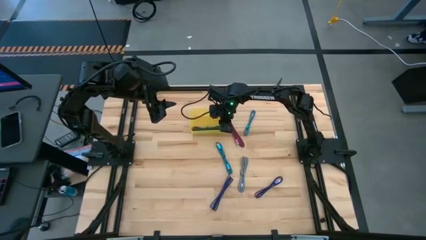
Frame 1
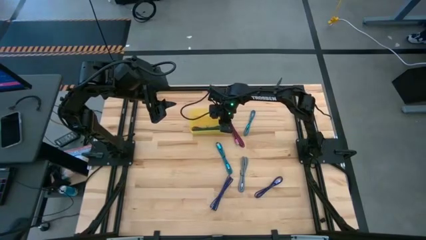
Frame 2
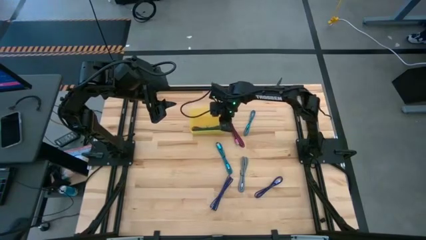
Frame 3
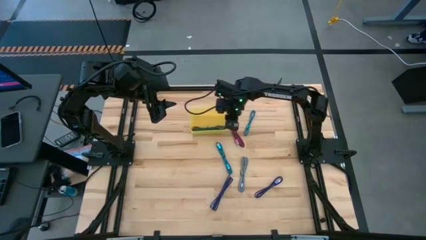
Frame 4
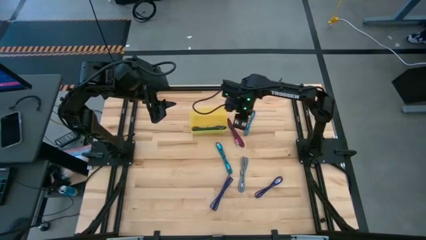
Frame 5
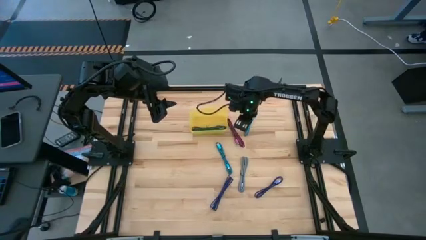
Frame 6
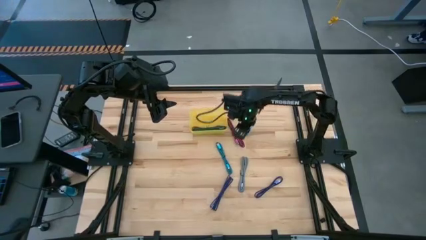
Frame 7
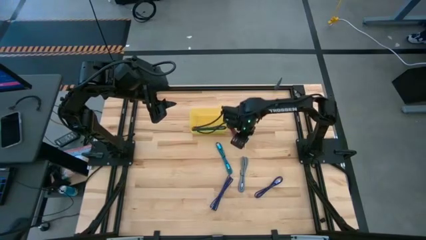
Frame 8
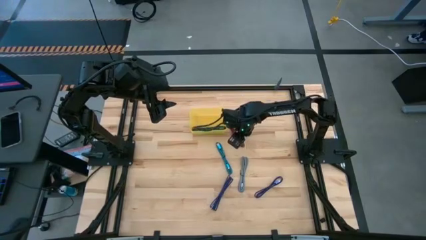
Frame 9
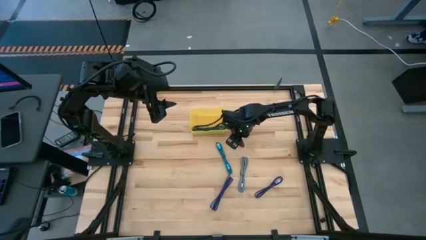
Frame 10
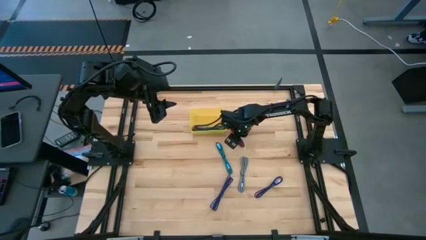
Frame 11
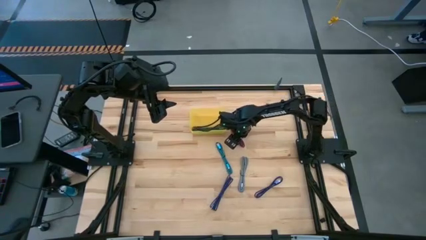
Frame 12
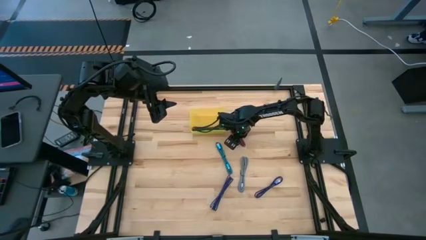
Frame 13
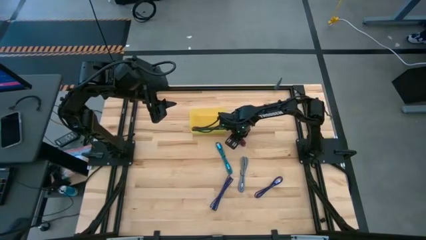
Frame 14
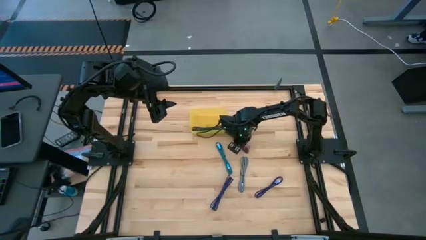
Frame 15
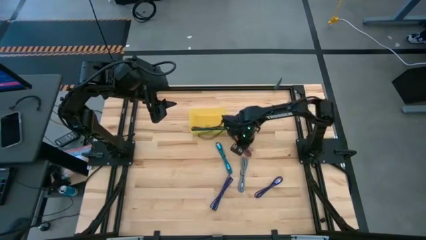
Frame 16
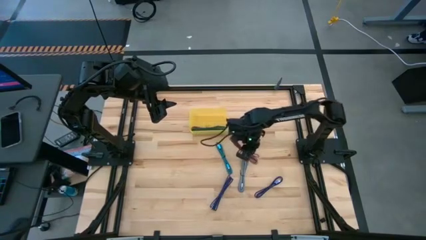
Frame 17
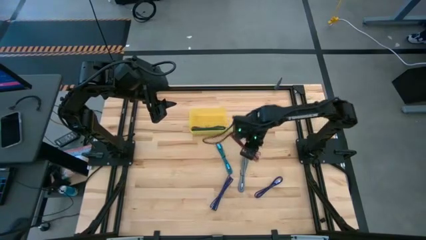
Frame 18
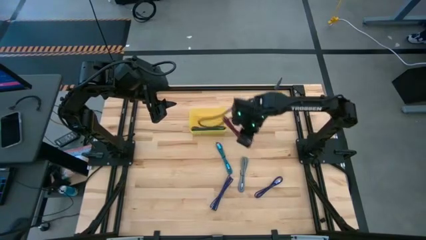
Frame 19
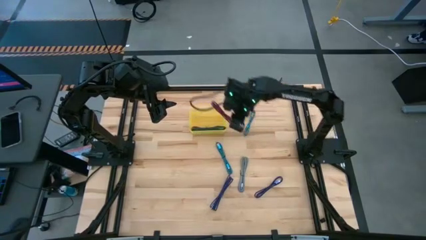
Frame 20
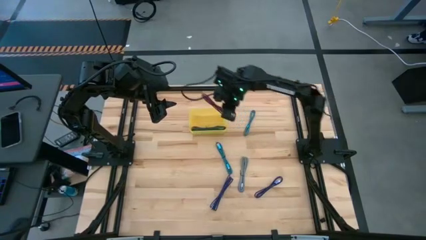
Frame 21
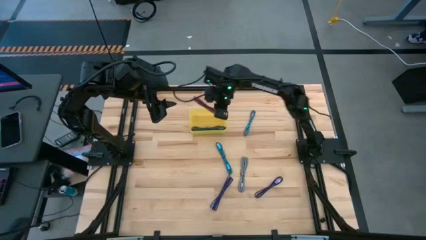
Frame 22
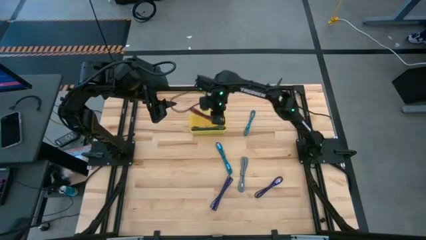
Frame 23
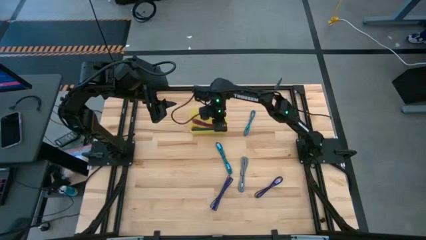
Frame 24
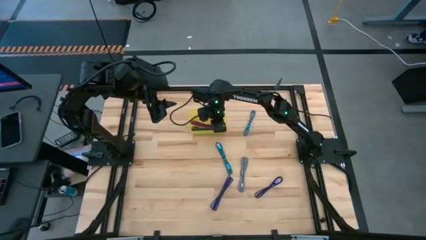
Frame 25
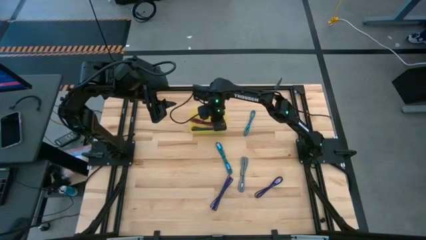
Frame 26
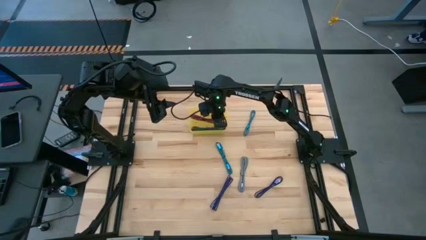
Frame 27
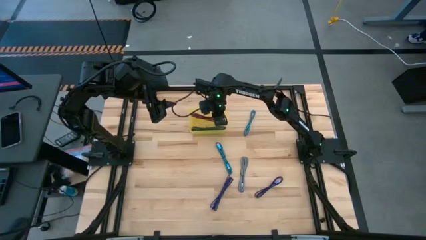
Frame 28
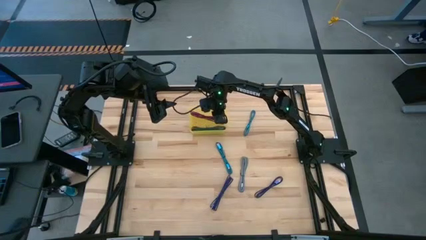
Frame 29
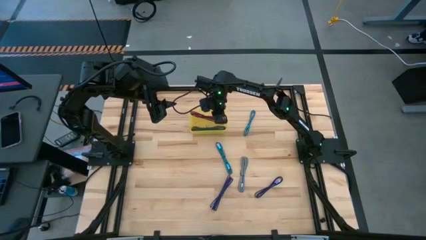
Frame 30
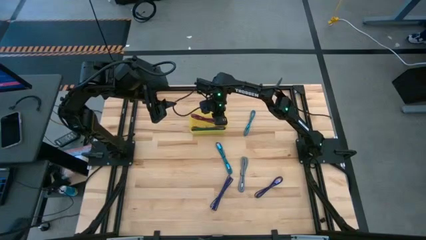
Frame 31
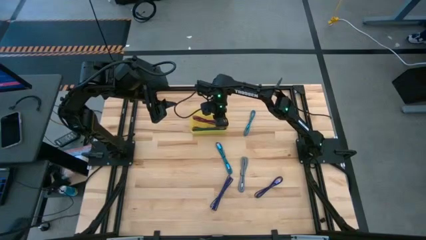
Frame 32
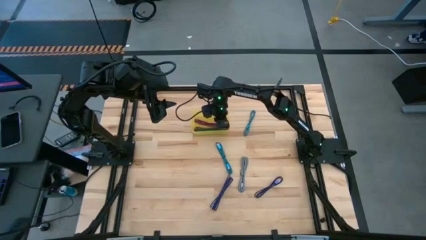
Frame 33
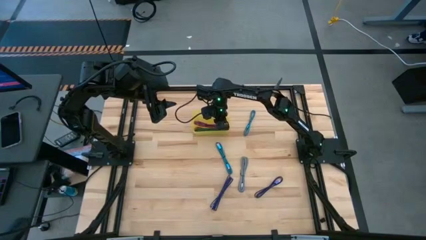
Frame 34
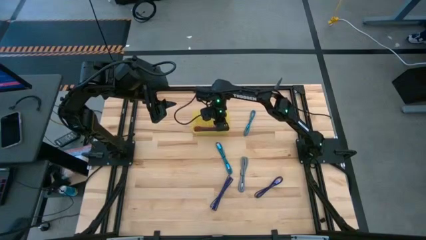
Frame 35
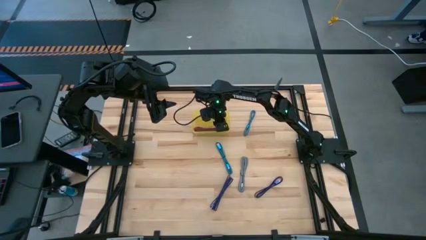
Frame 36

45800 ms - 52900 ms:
Task: Pick and place USB-C Cables
Put the pink charger cable into the bin

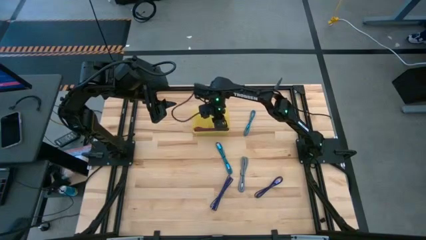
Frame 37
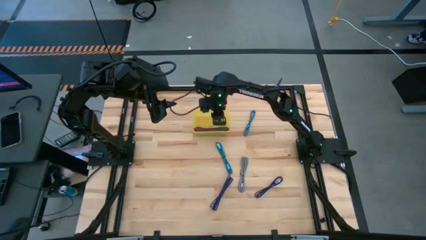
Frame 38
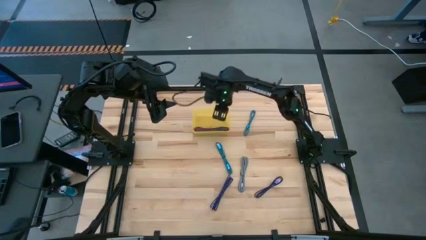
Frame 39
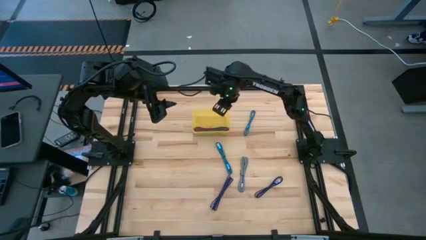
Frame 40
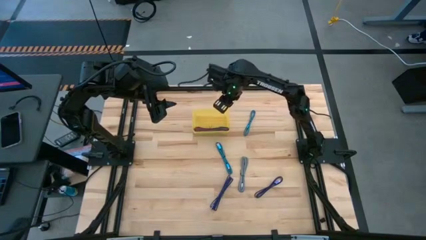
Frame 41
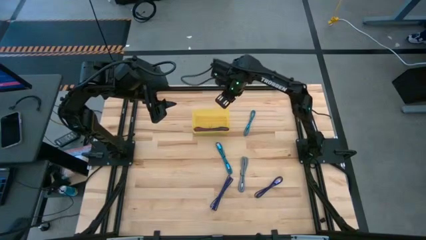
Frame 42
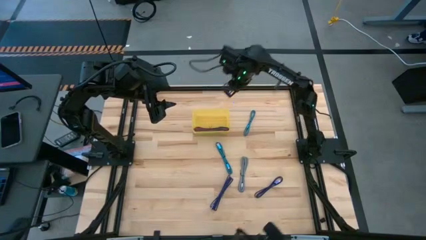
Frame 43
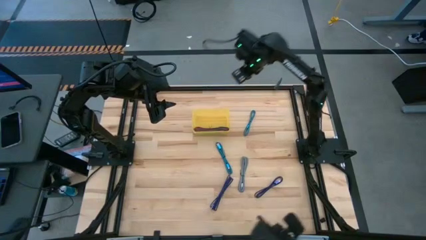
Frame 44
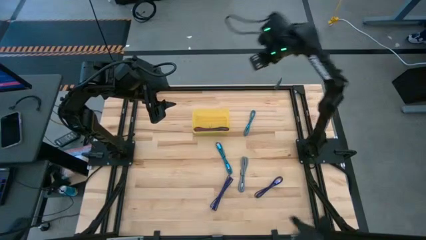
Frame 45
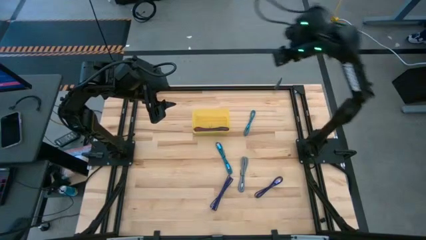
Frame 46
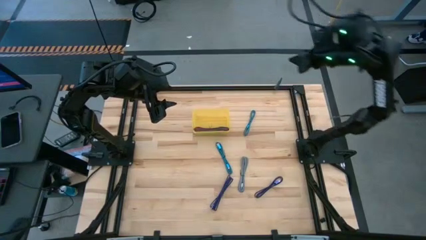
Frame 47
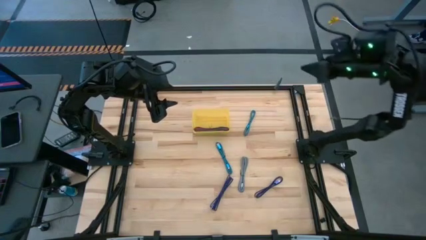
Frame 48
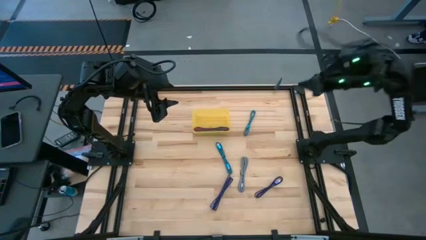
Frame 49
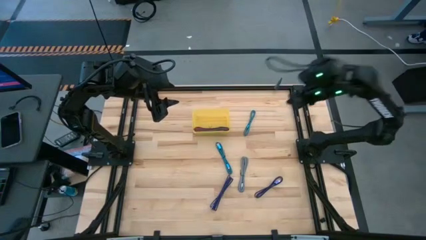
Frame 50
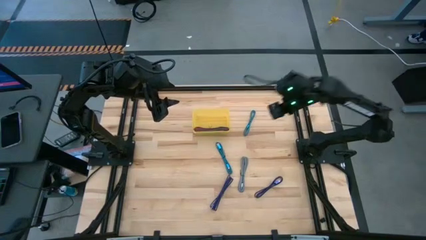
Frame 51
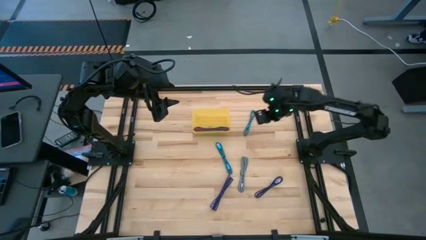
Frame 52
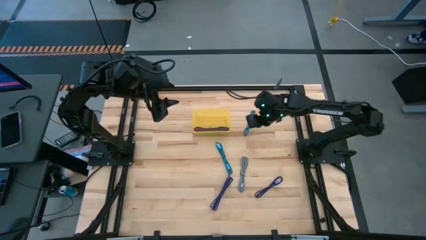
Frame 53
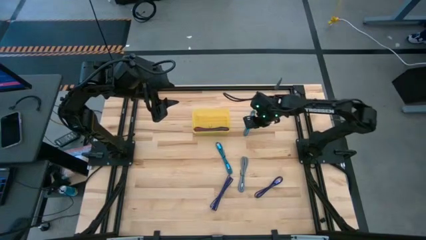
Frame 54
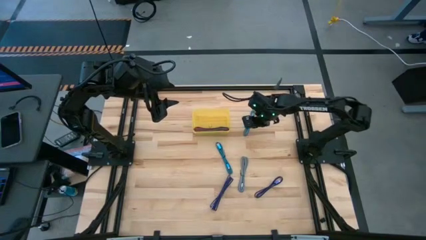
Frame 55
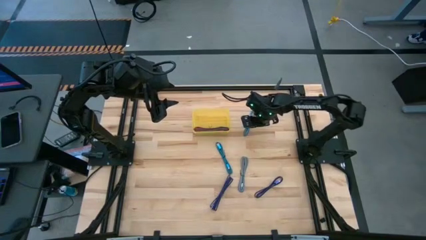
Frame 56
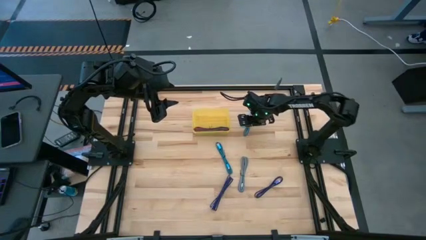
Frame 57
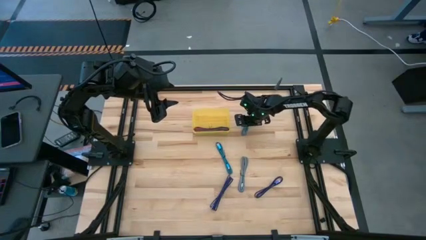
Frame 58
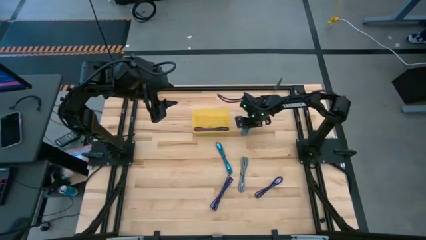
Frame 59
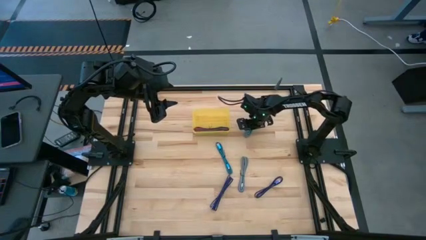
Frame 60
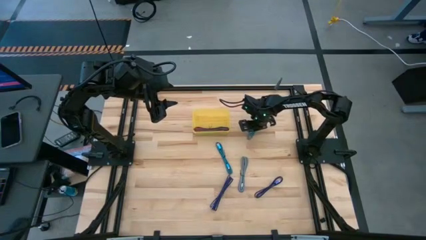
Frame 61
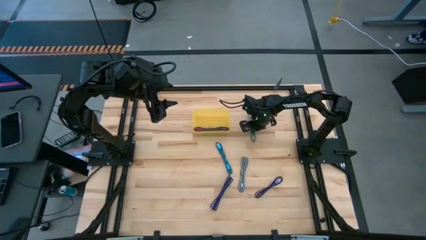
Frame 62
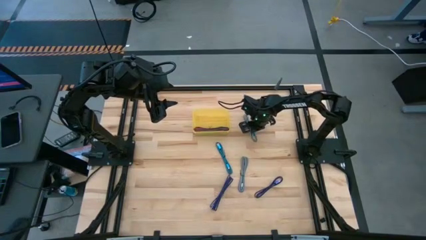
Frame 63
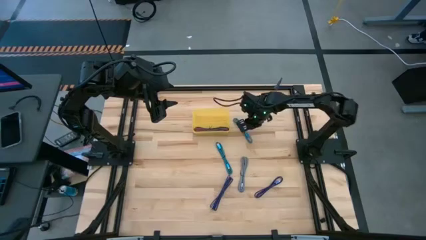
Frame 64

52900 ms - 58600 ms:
Put the top blue charger cable into the bin
